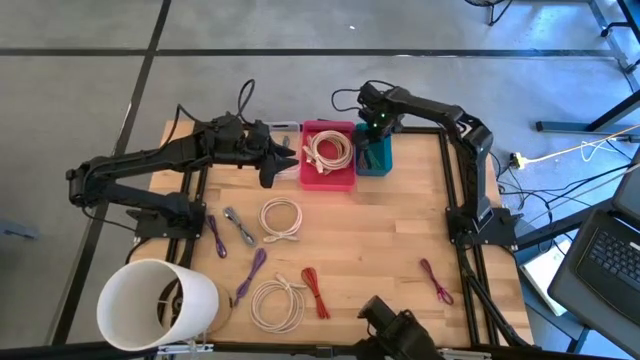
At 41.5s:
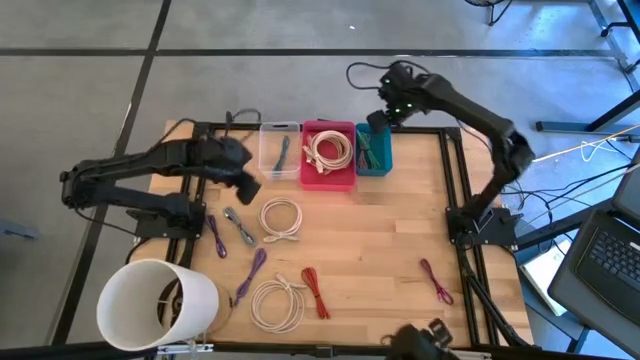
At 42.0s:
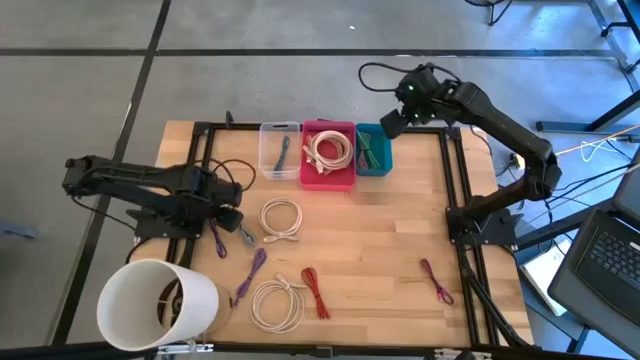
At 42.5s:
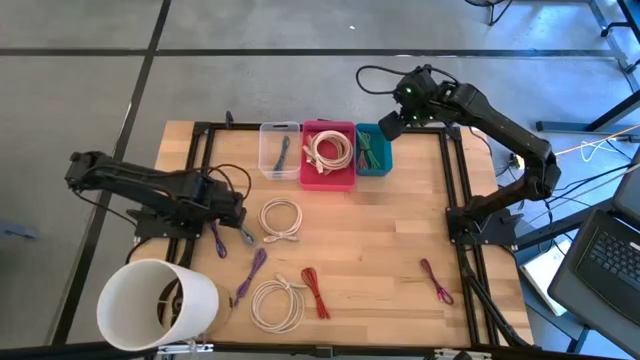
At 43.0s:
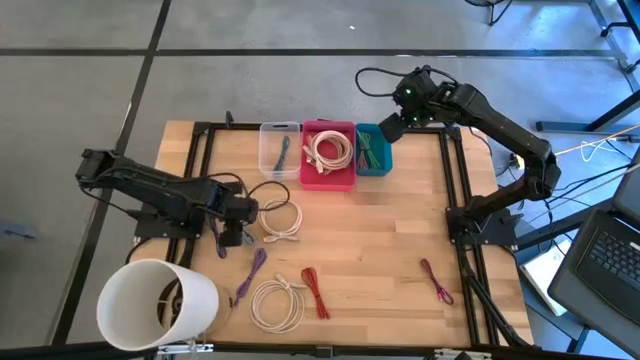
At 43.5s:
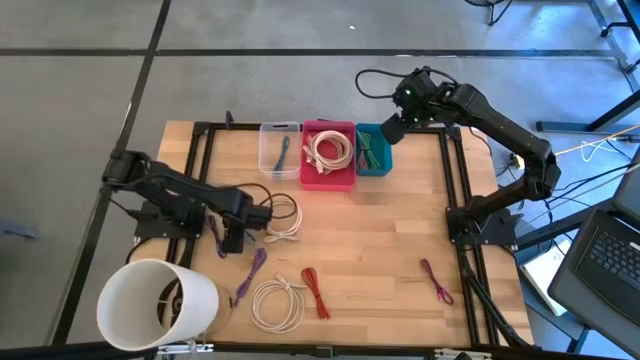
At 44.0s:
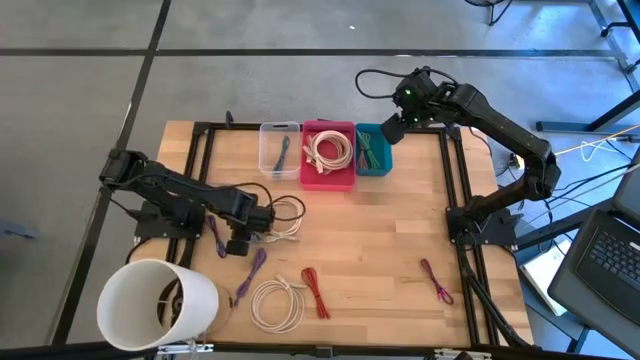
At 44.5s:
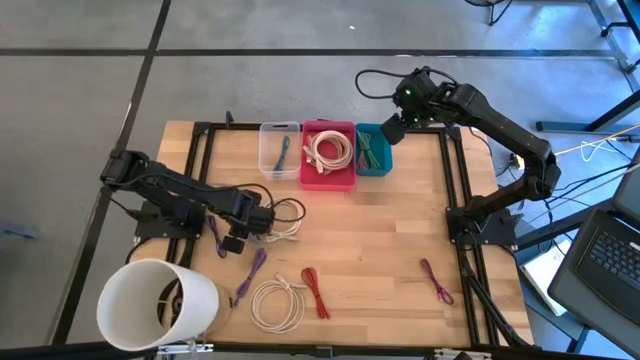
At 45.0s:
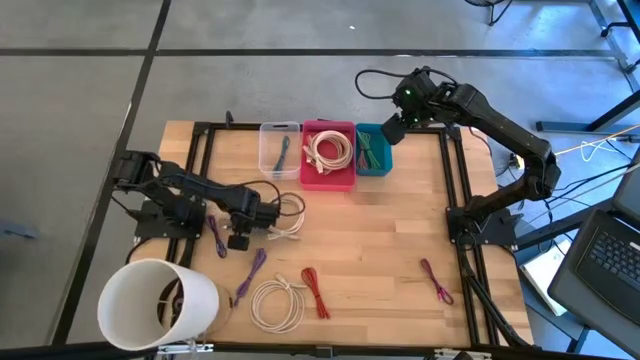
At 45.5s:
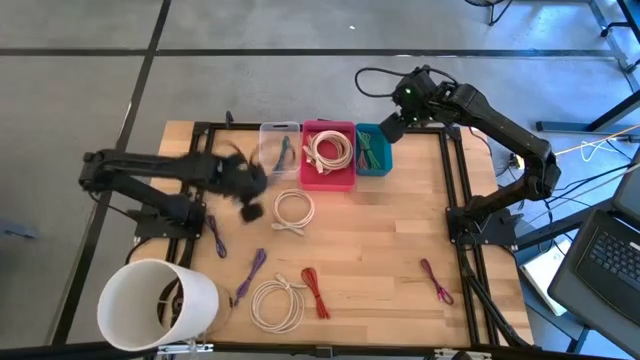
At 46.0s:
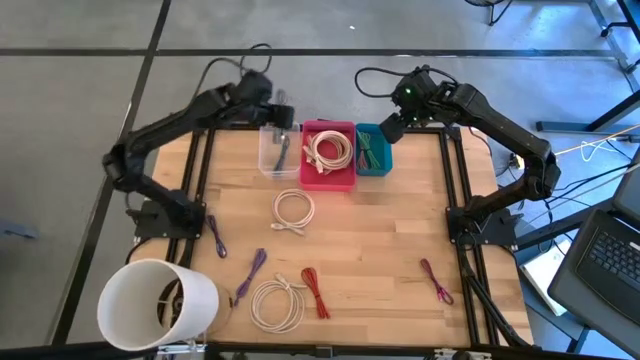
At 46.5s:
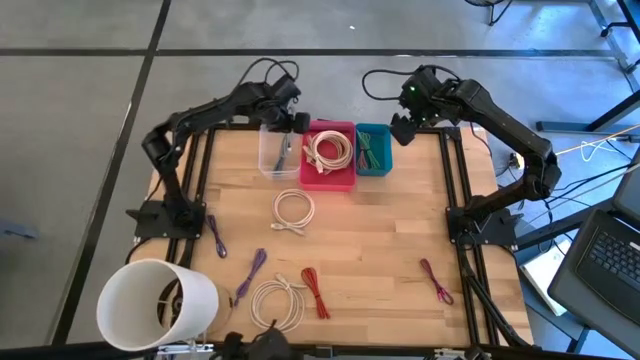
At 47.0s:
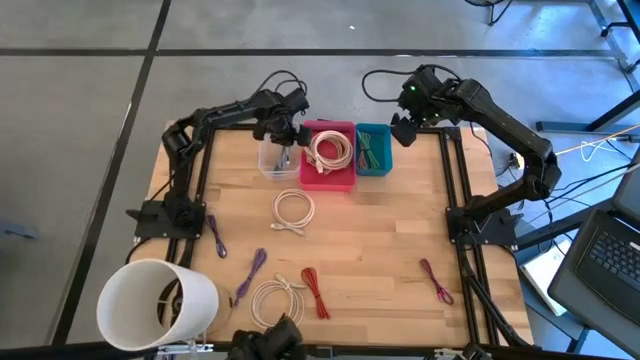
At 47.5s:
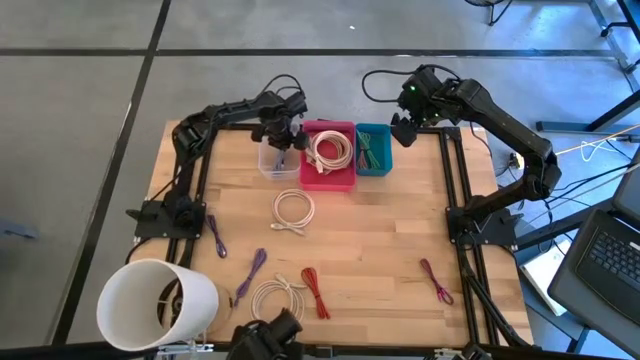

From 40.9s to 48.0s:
Task: Pick & Place USB Port
Put the white patterned USB cable into the transparent bin

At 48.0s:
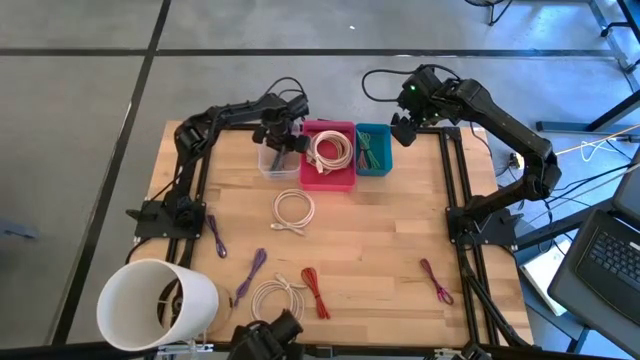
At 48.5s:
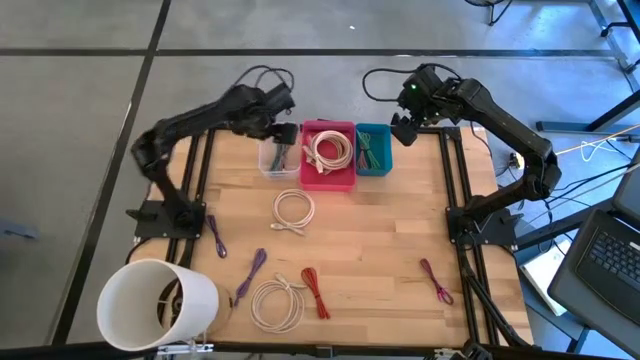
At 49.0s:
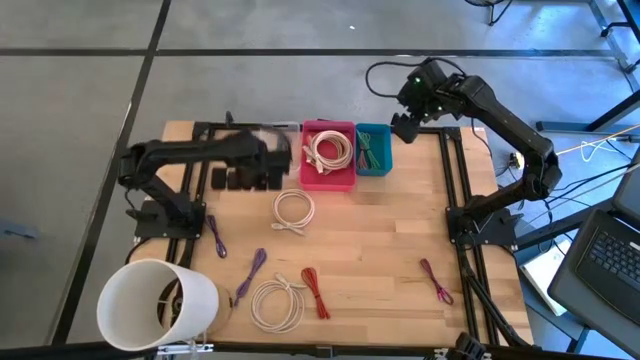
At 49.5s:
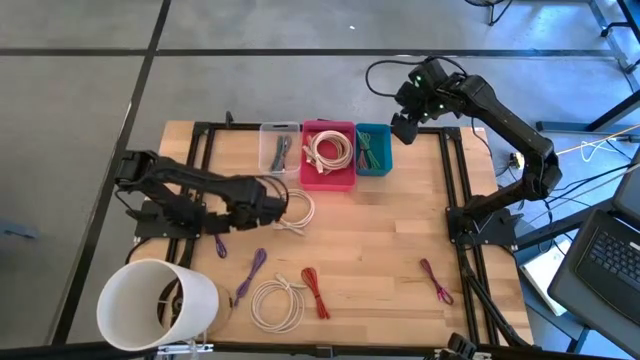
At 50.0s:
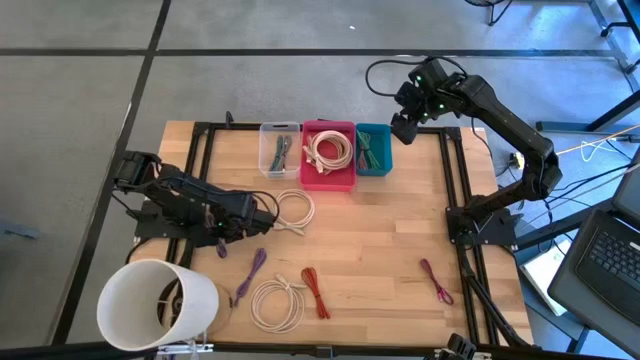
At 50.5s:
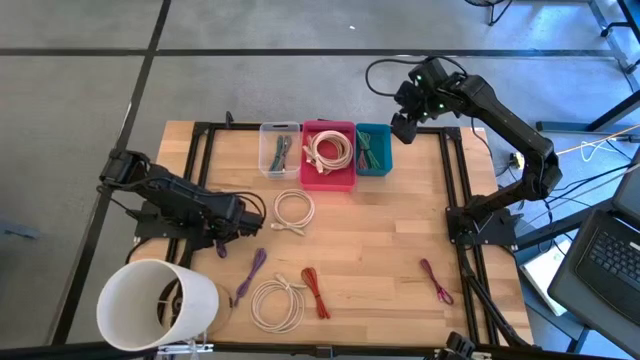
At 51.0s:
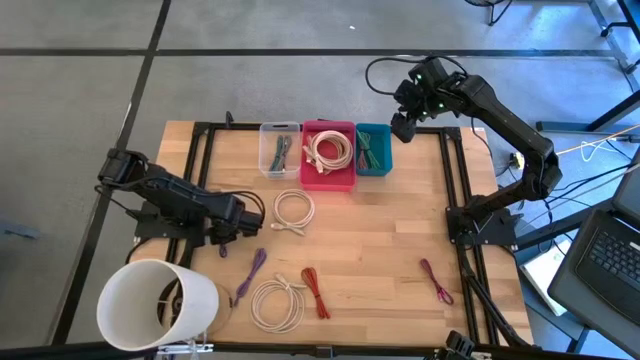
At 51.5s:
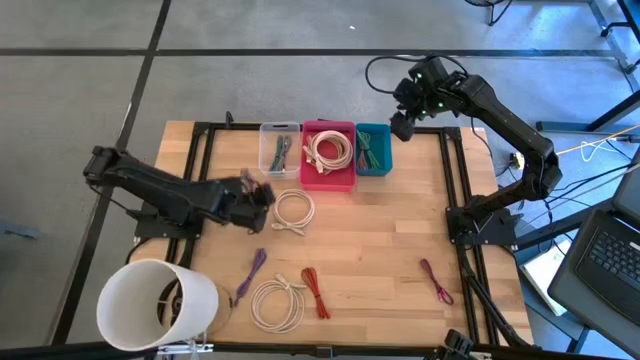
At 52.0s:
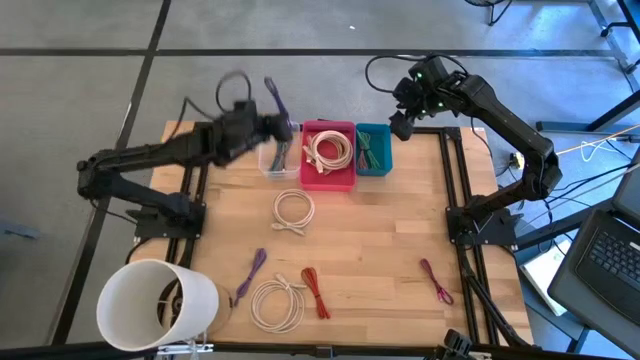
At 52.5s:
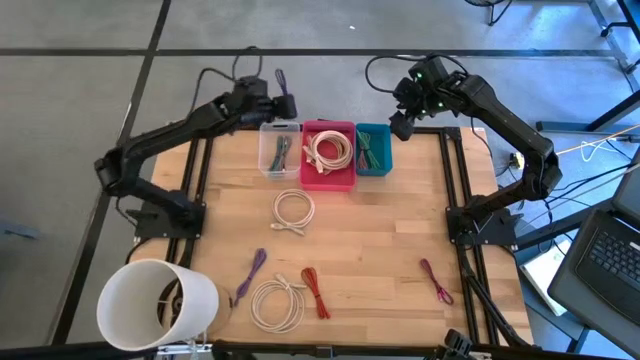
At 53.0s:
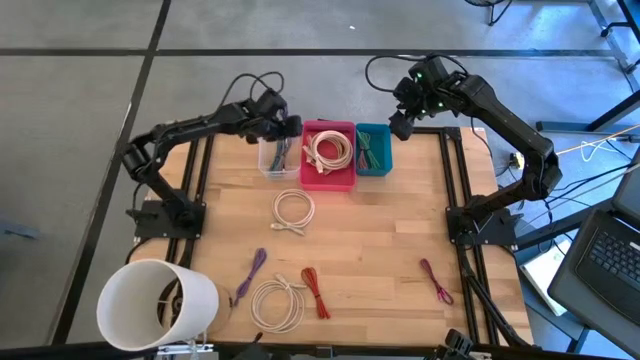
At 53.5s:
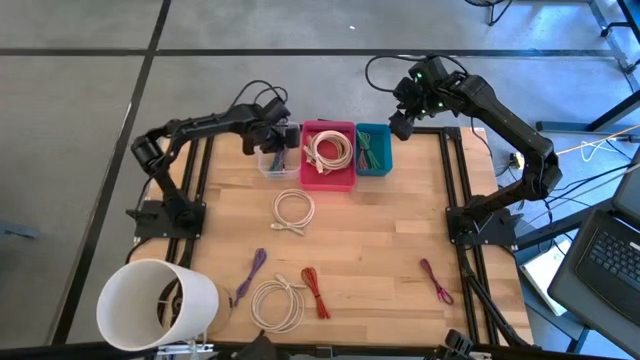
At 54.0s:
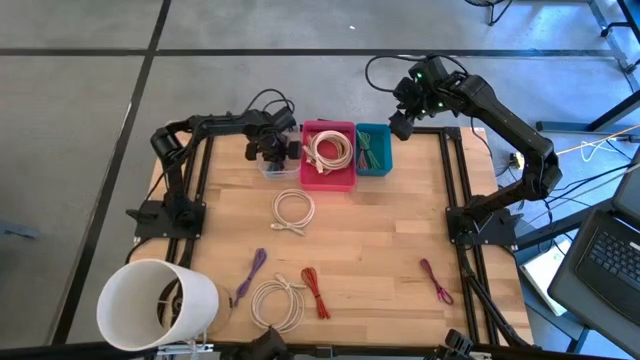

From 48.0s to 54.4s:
Put the purple patterned USB cable into the transparent bin

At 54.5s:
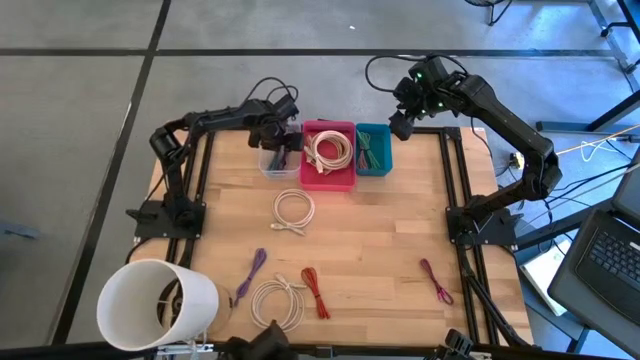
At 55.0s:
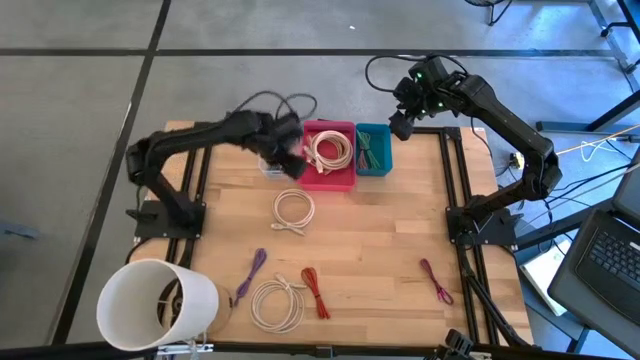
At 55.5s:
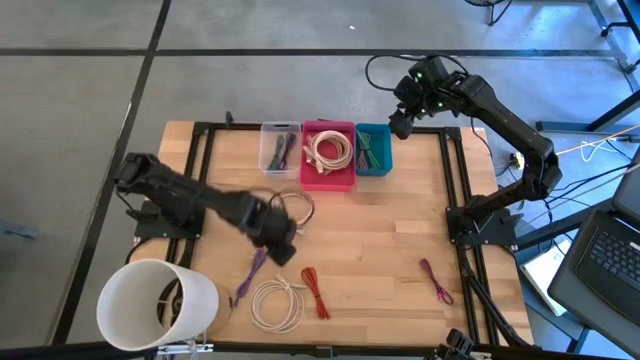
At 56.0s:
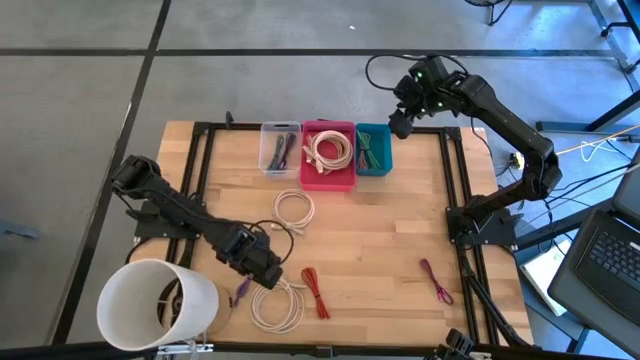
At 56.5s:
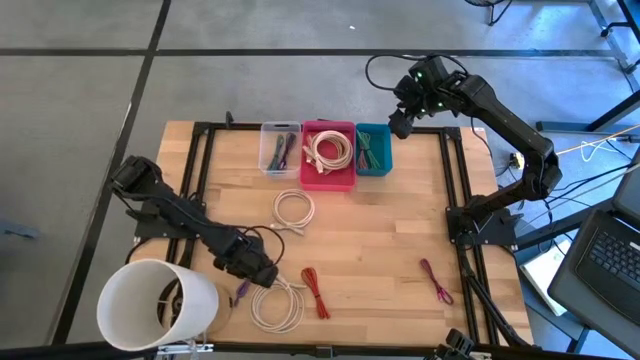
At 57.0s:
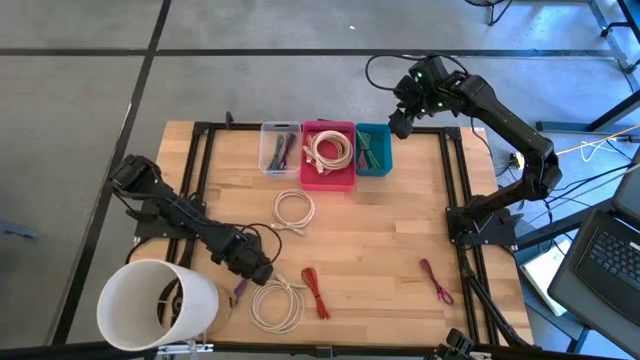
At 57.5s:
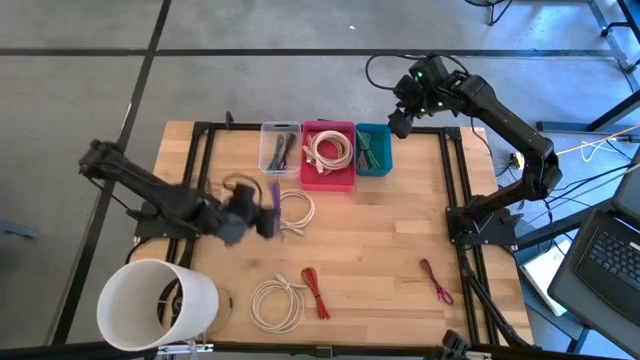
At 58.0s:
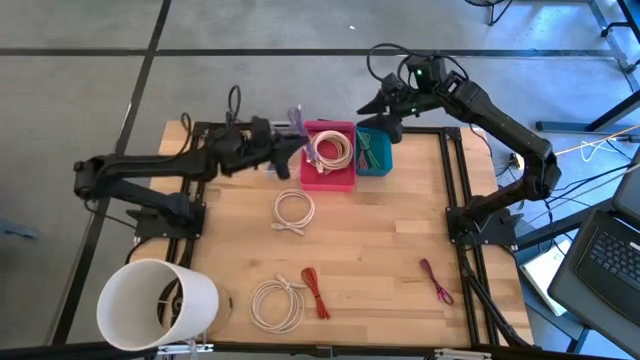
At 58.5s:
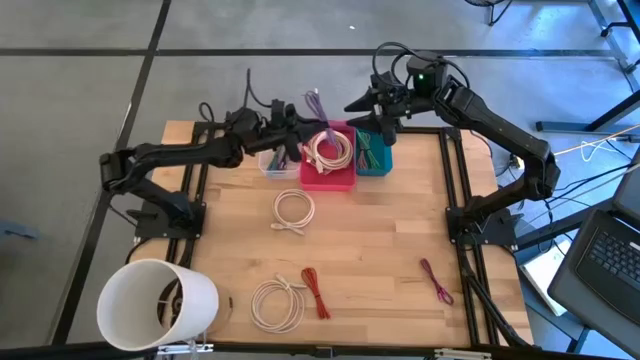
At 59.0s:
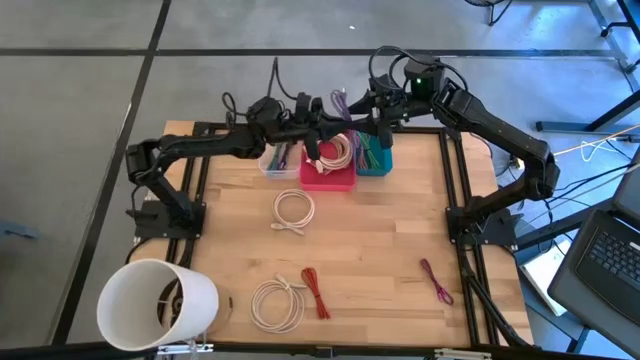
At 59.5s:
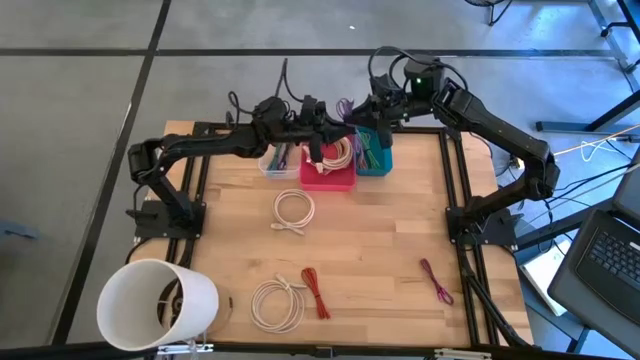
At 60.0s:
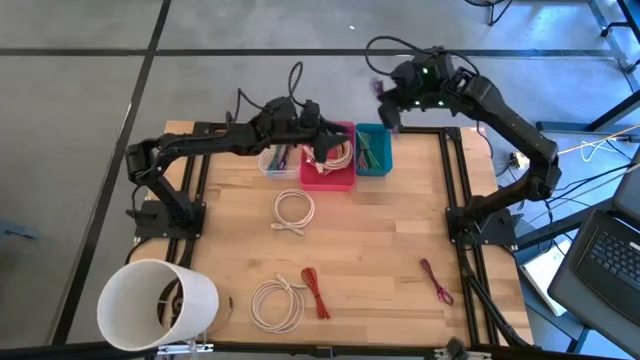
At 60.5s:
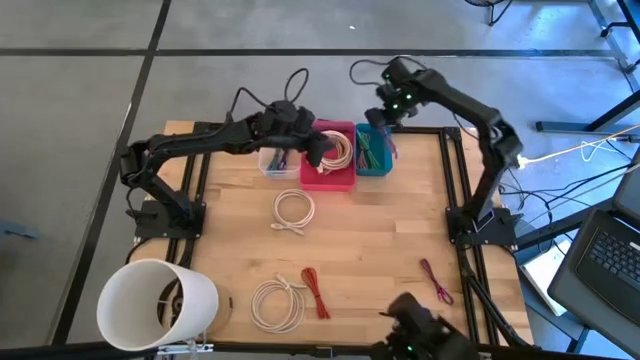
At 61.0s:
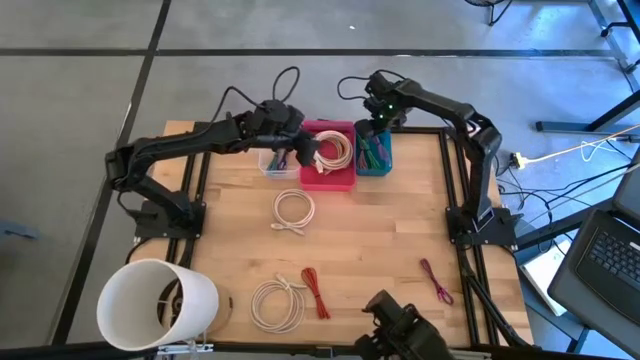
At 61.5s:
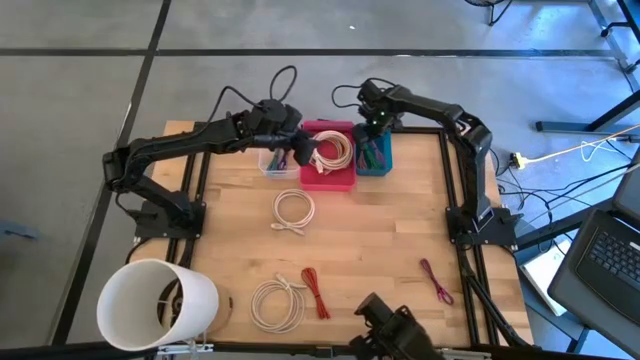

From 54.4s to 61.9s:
Put the purple USB cable into the blue bin

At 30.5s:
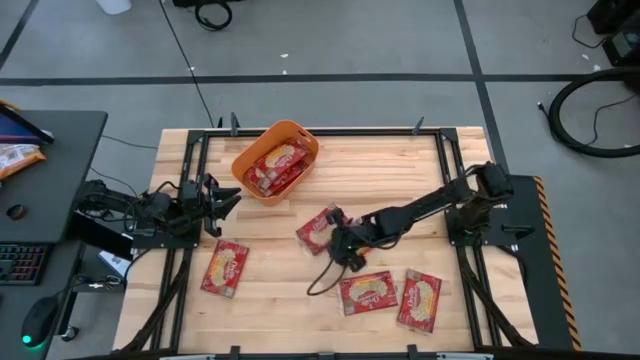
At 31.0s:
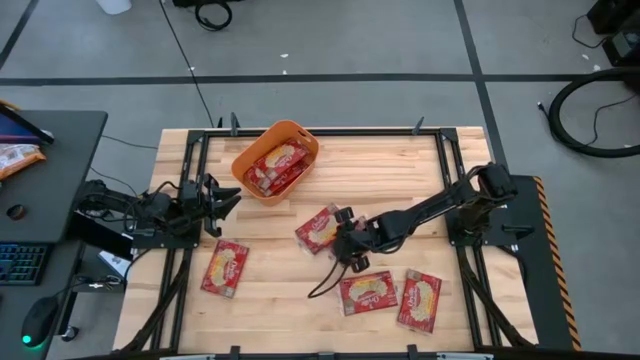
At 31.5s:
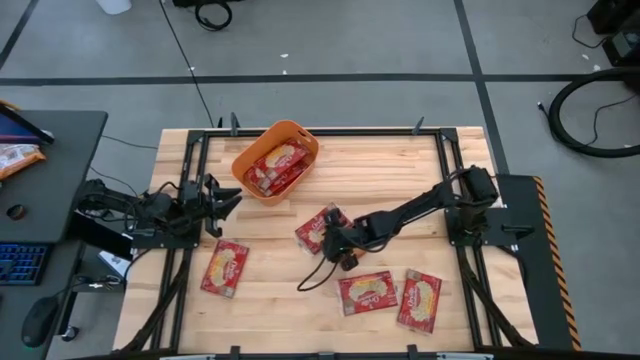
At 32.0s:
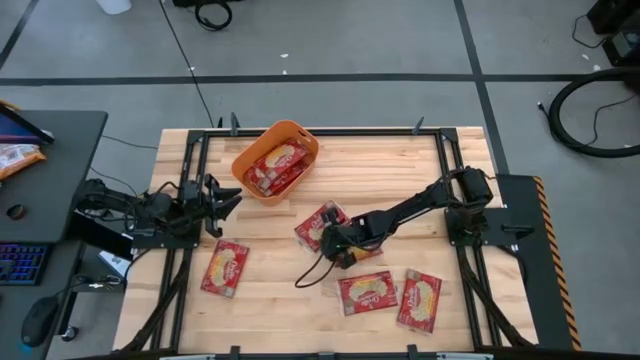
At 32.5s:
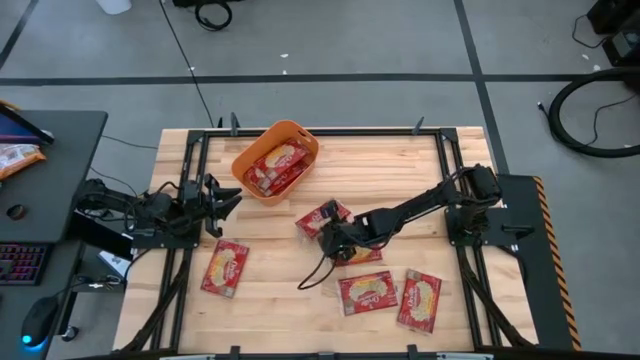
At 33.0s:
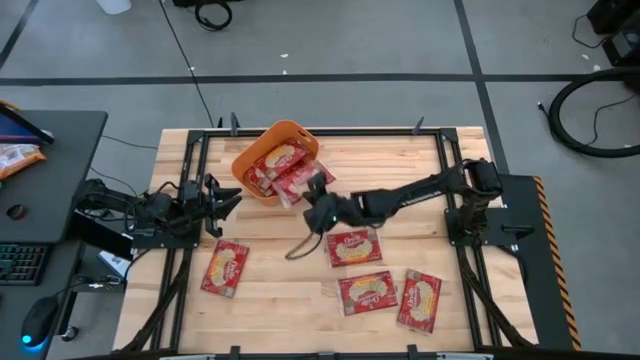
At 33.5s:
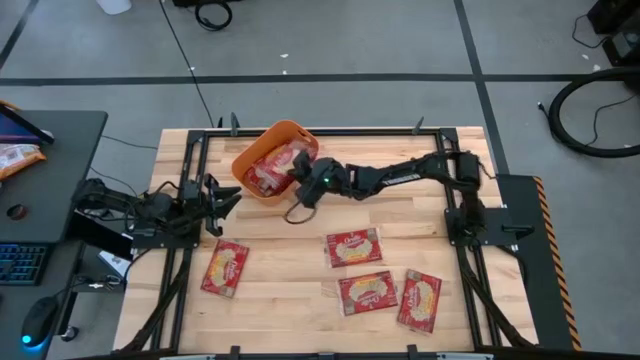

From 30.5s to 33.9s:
Task: Sort popcorn bags into baskets
Put the red popcorn bag into the orange bin
